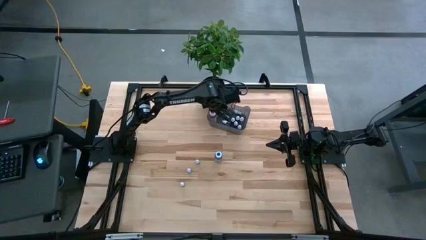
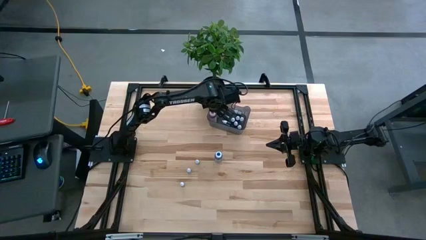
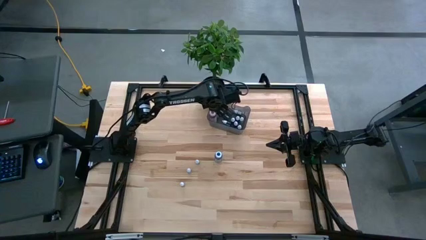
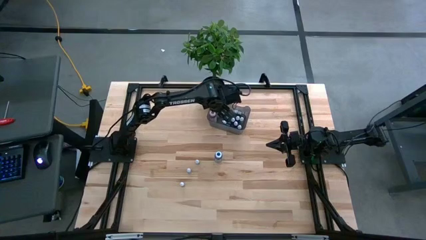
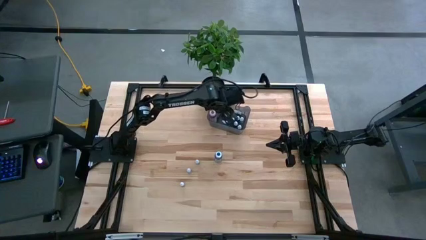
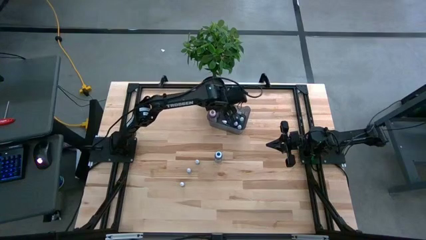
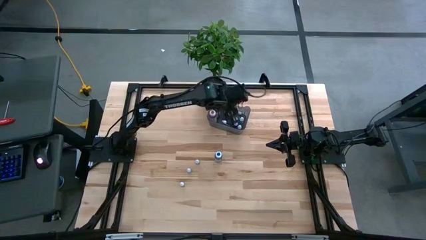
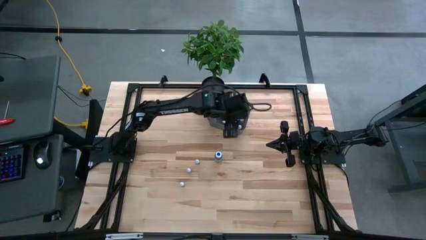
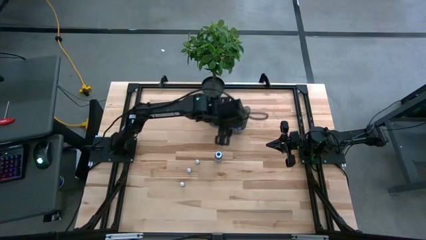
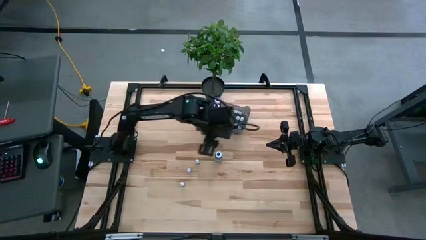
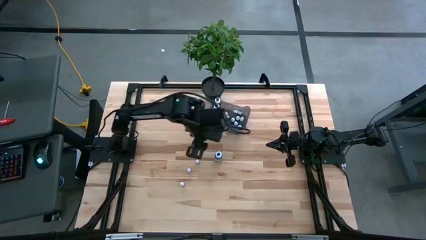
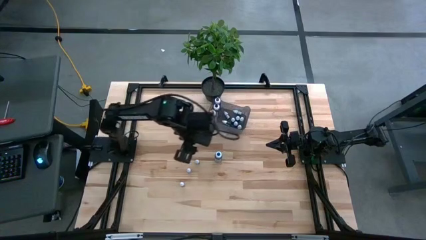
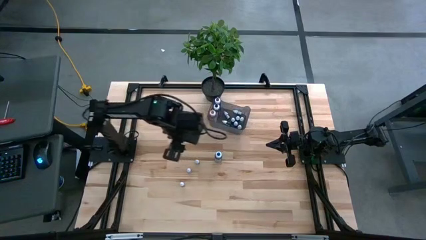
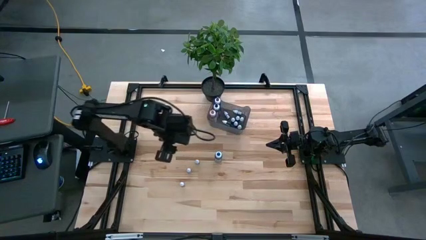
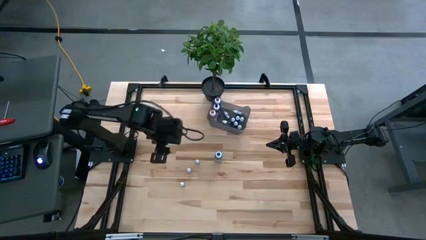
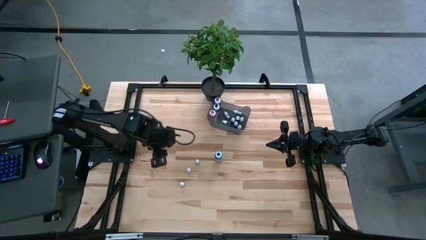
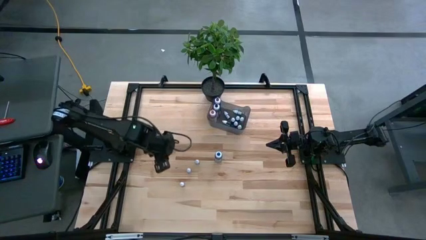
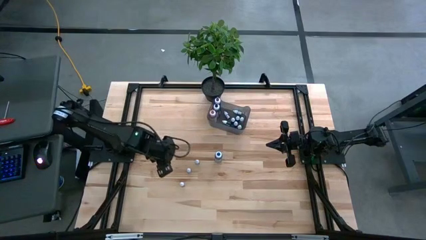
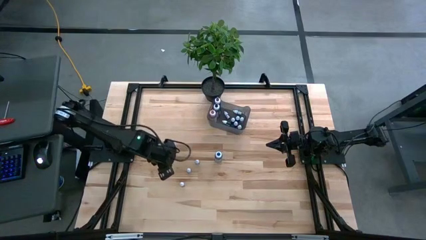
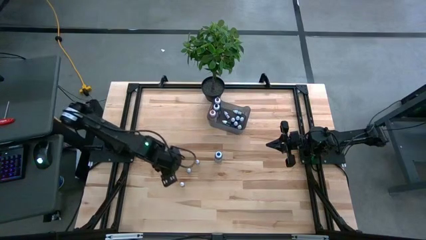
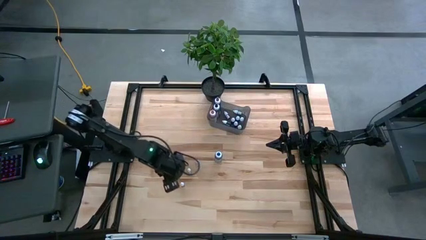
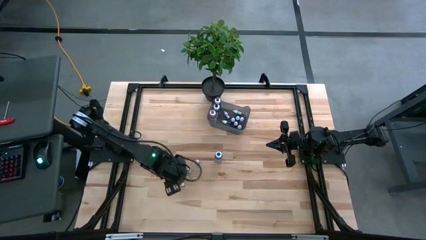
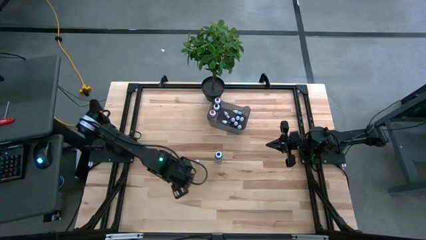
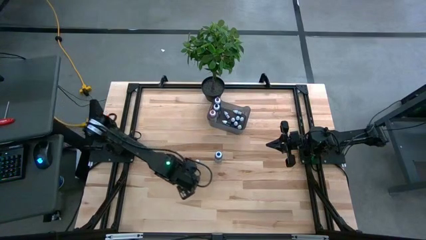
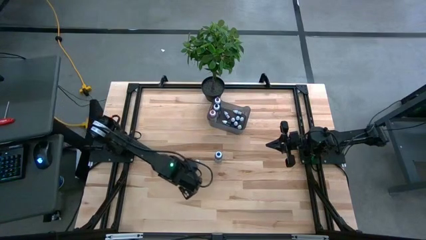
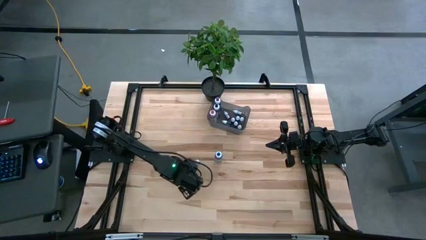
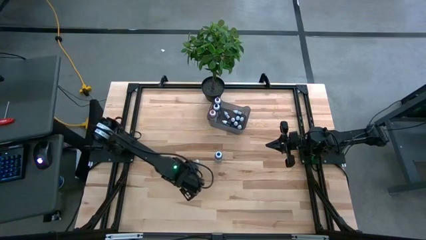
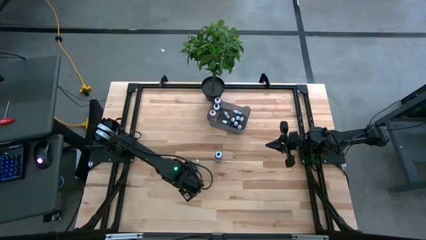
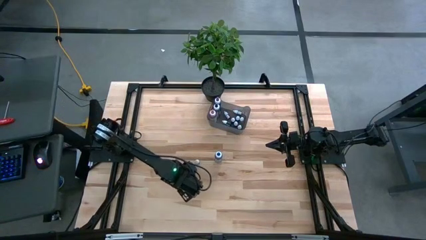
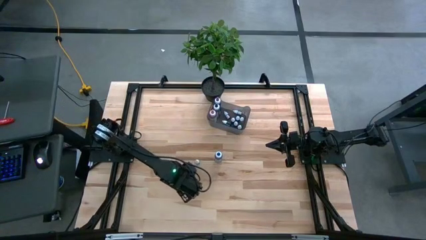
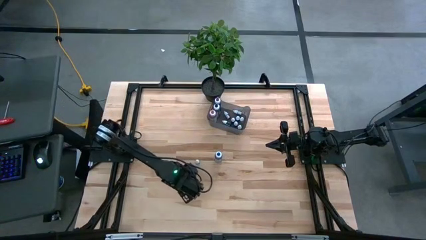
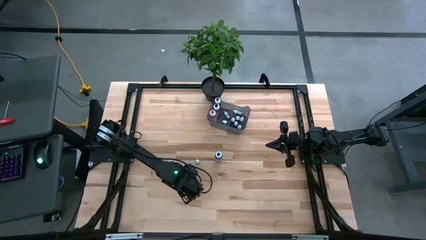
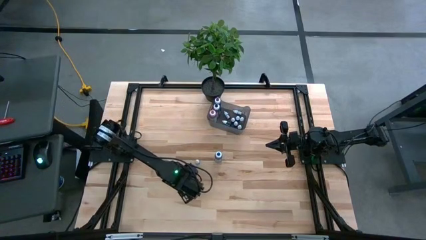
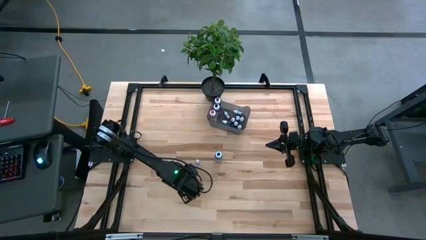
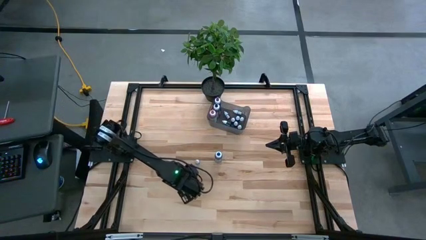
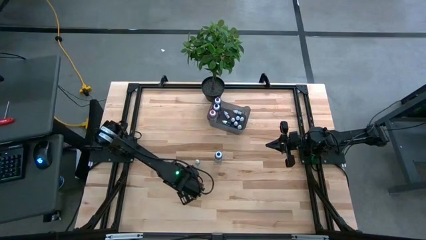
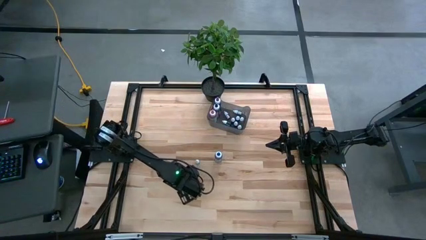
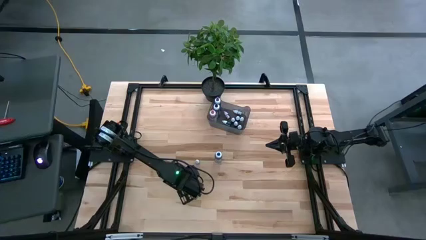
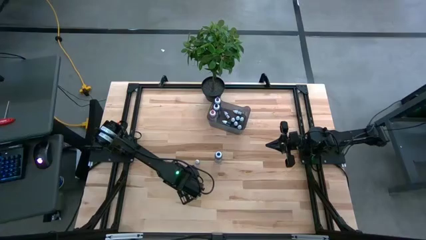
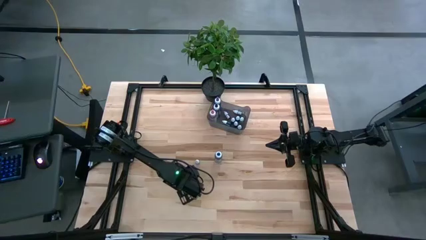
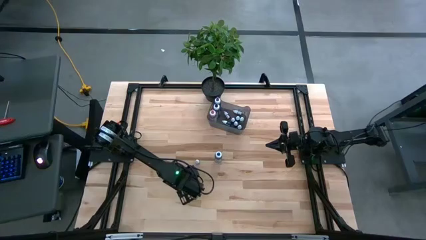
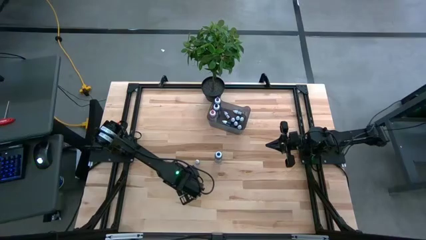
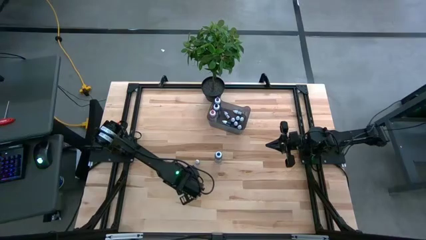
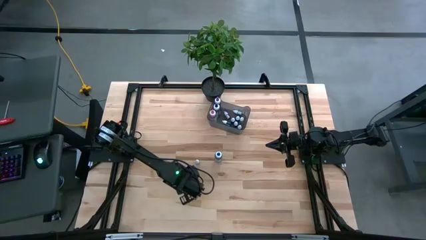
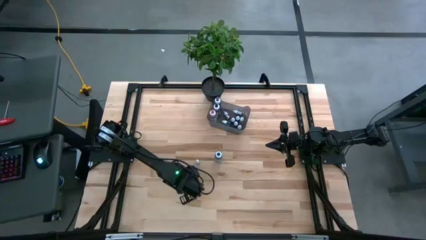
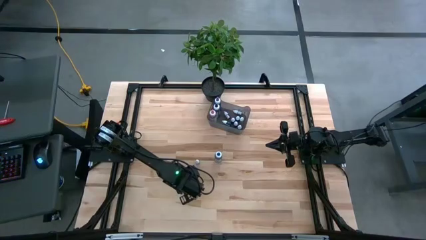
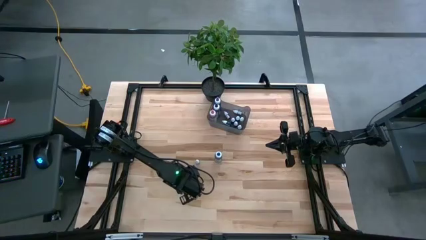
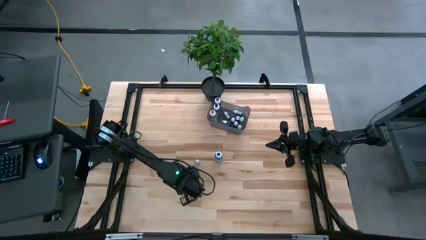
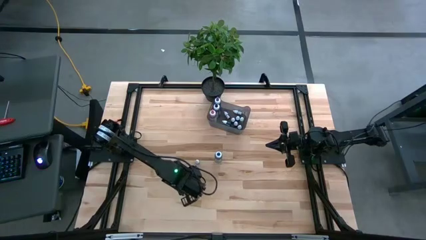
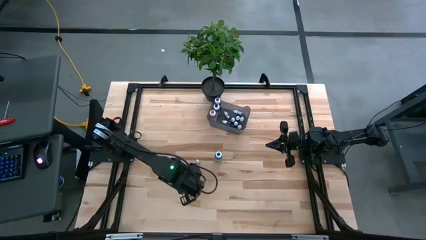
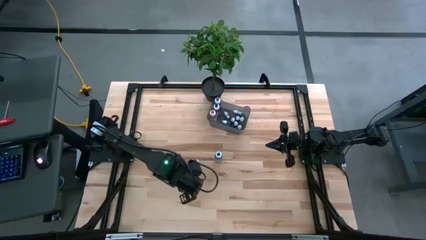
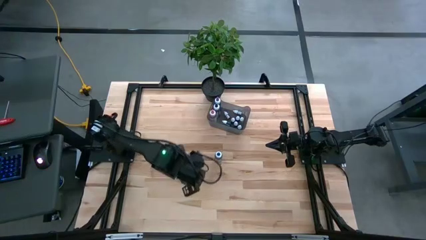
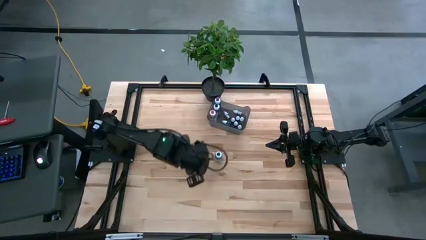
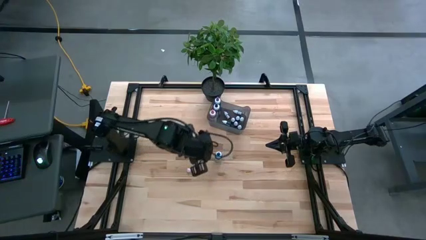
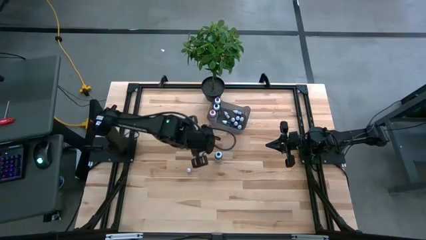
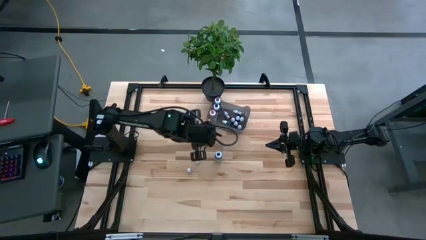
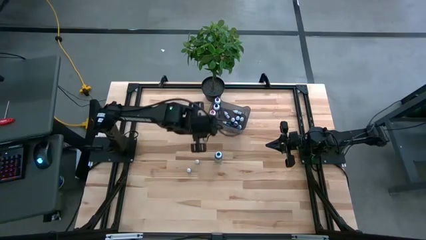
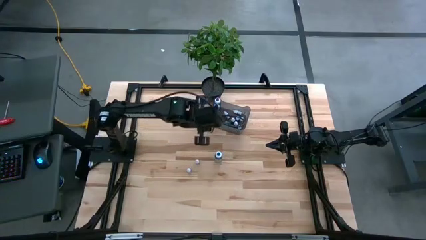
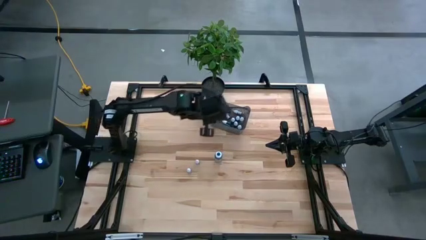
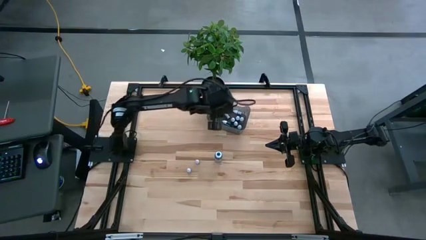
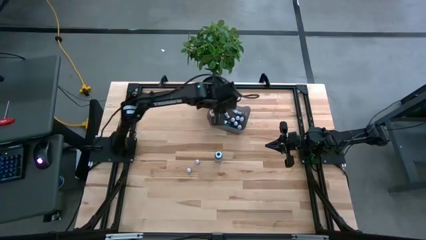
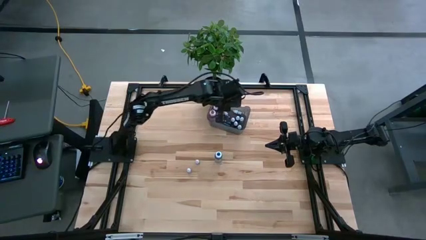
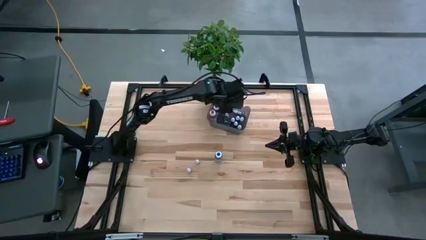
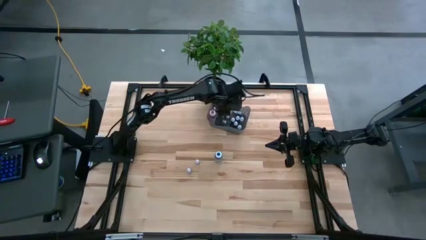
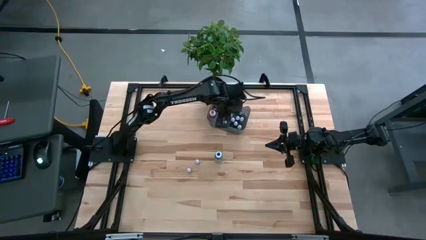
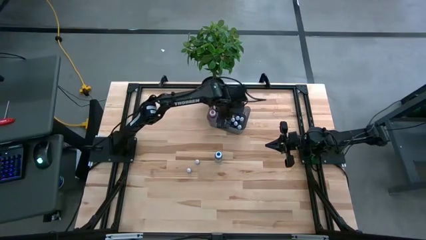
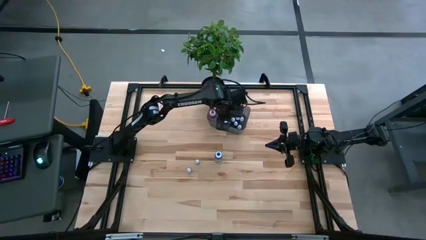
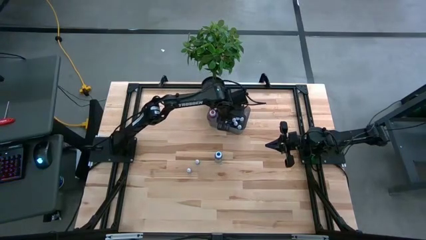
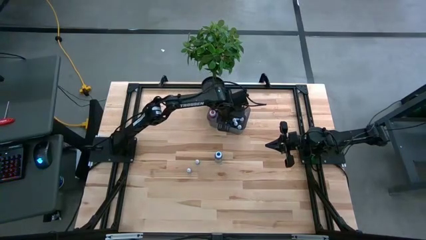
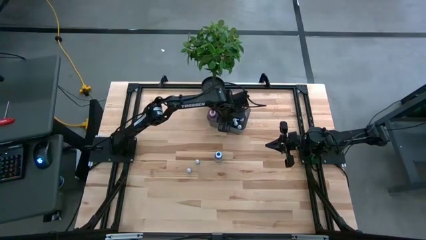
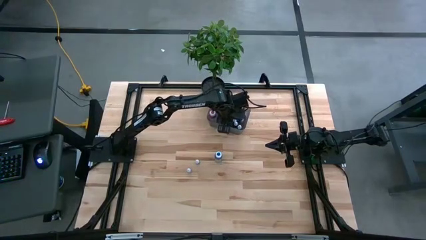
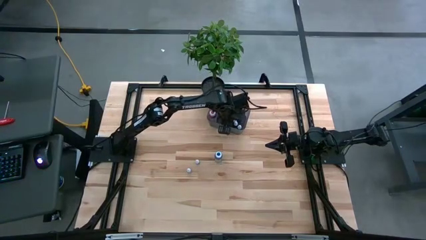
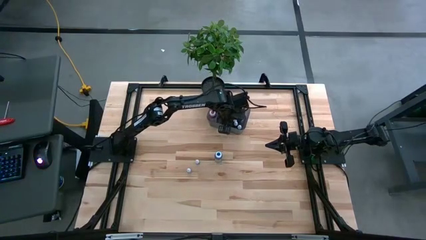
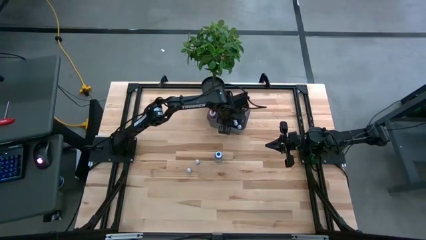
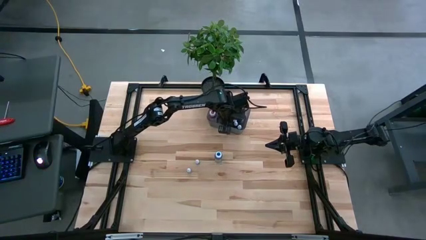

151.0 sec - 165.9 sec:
Task: Pick & Place food coloring
Put the small brown food coloring bottle into the black bin

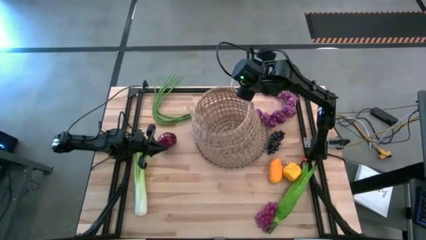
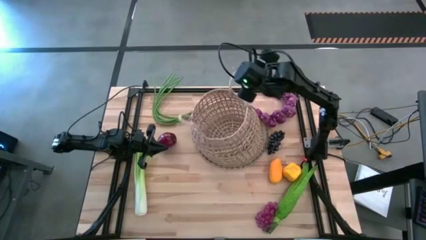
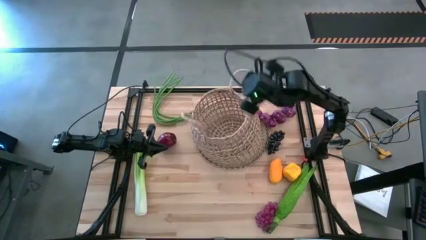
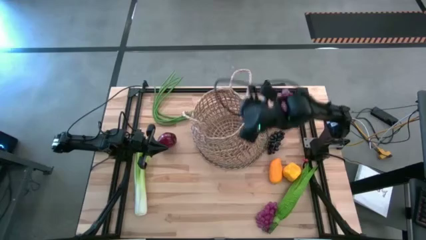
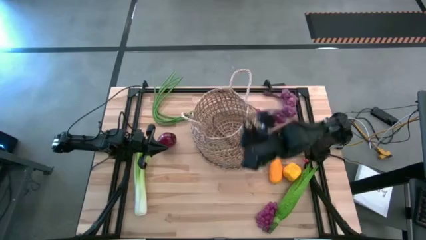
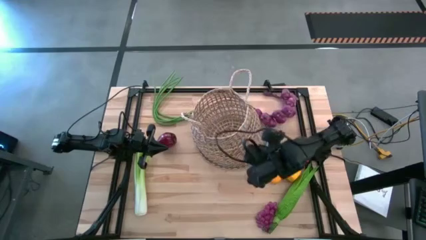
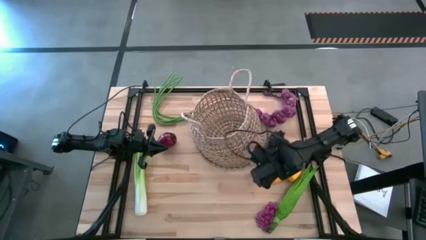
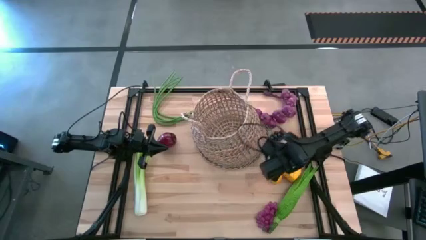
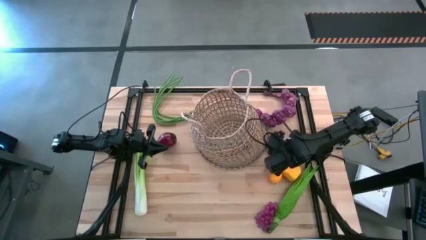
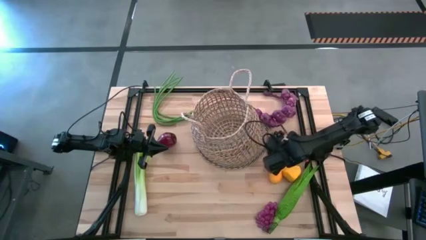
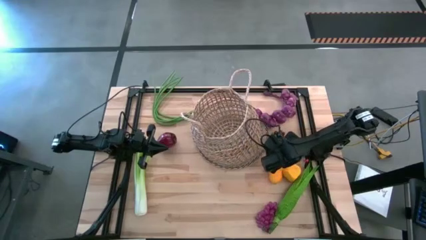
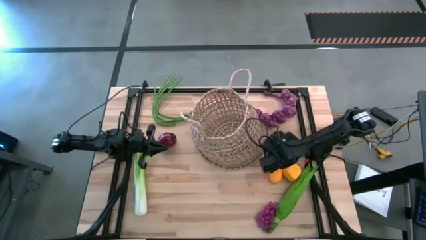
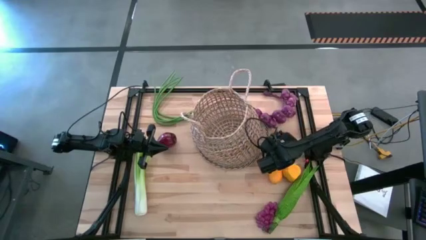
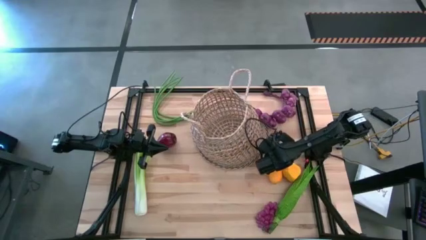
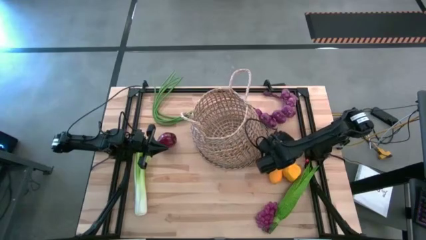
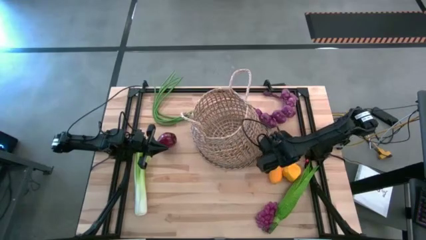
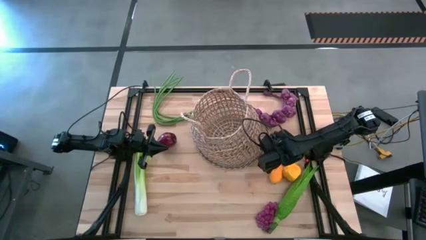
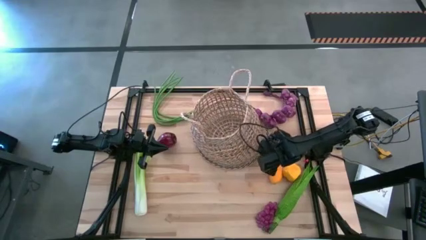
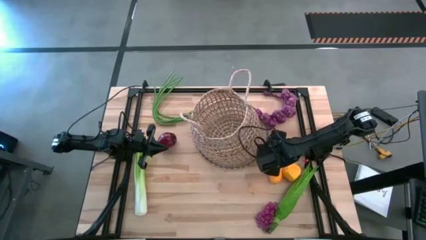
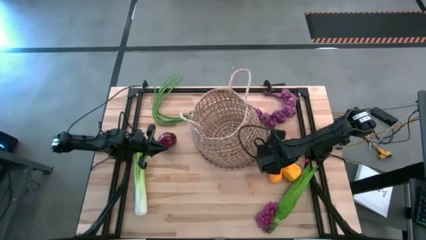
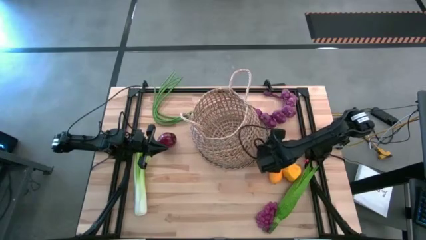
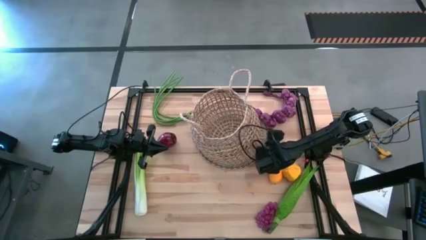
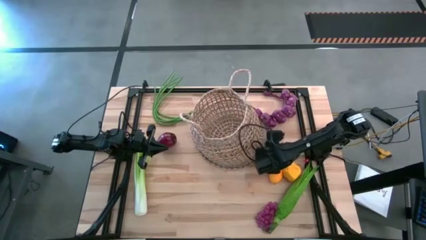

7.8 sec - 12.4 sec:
Task: Build produce basket
Put the dark purple grapes into the light brown basket
